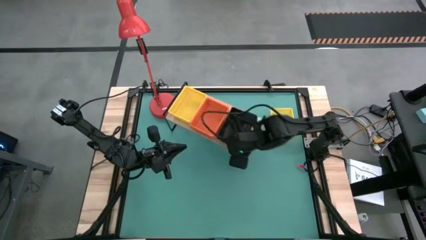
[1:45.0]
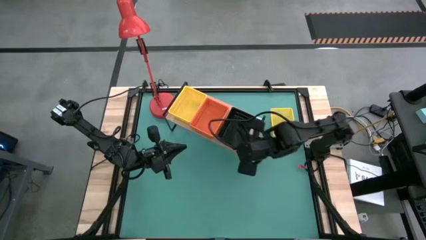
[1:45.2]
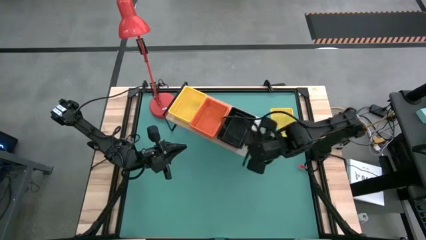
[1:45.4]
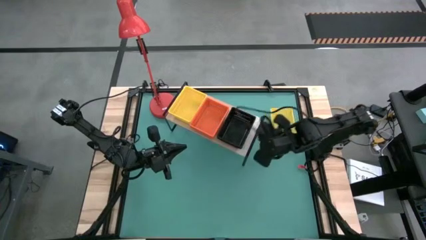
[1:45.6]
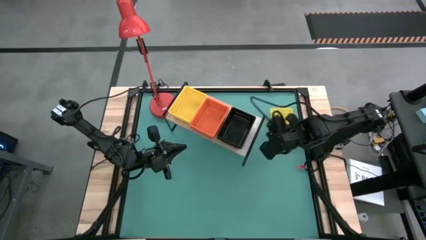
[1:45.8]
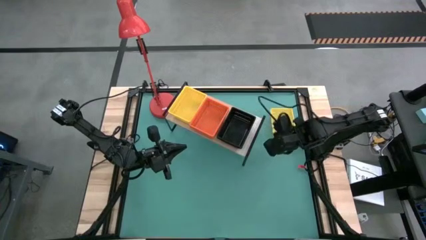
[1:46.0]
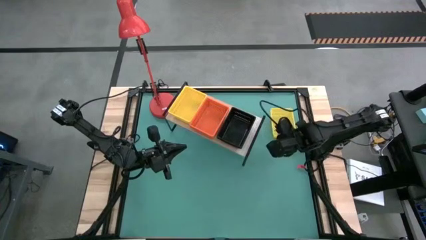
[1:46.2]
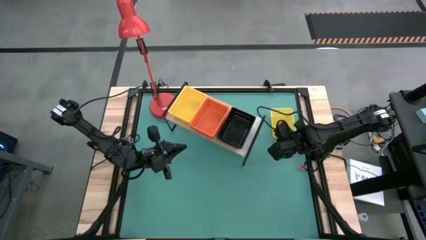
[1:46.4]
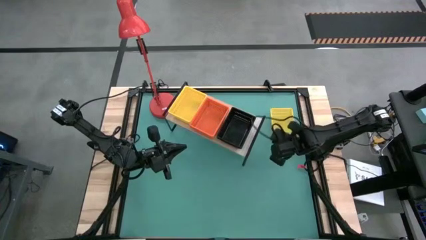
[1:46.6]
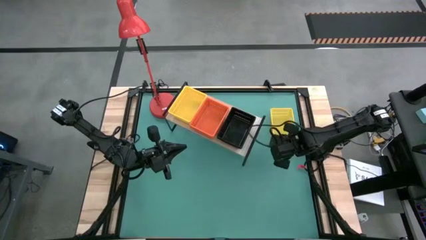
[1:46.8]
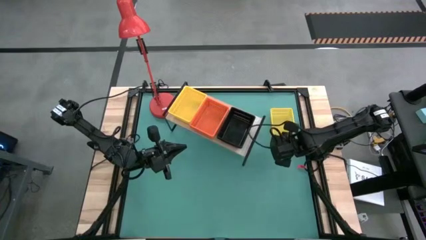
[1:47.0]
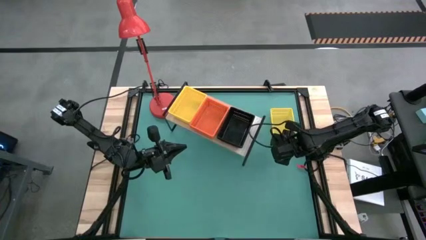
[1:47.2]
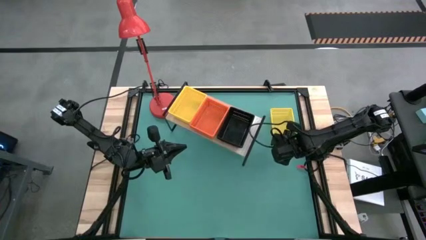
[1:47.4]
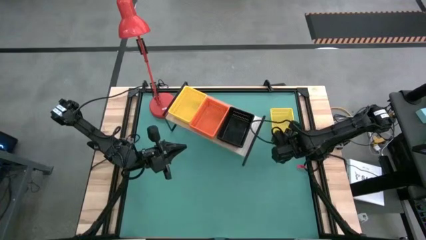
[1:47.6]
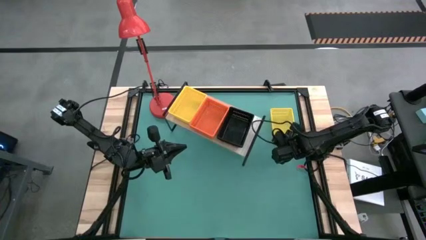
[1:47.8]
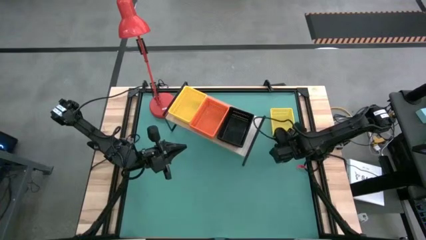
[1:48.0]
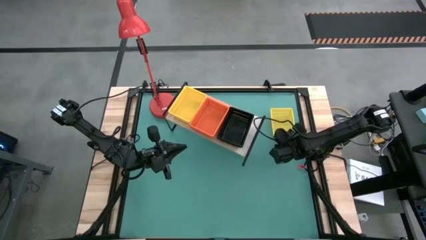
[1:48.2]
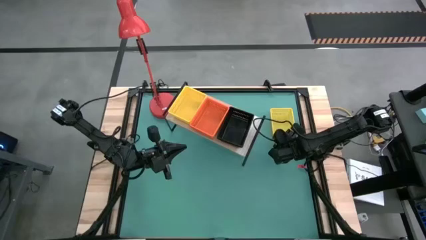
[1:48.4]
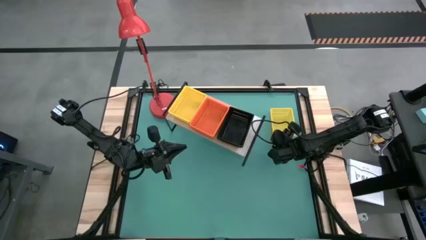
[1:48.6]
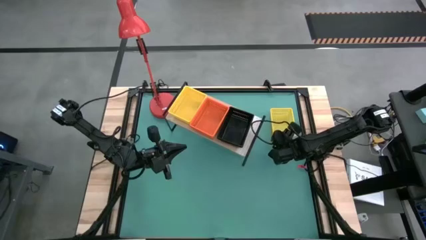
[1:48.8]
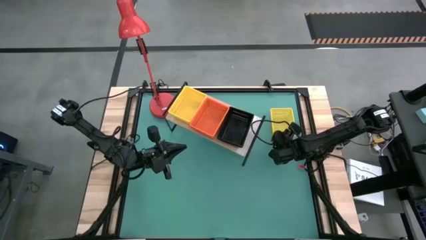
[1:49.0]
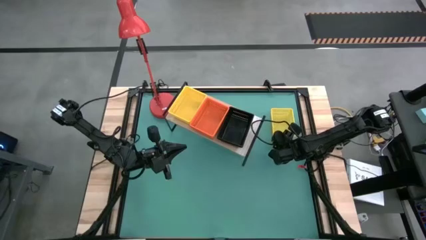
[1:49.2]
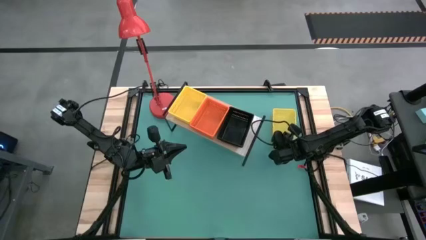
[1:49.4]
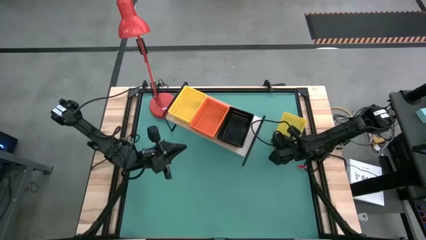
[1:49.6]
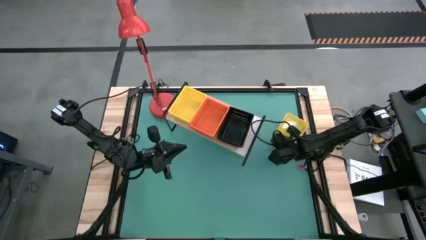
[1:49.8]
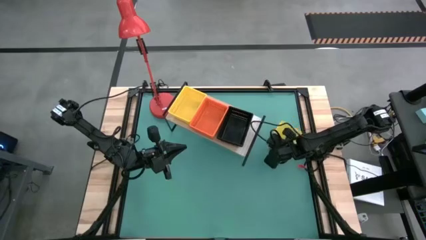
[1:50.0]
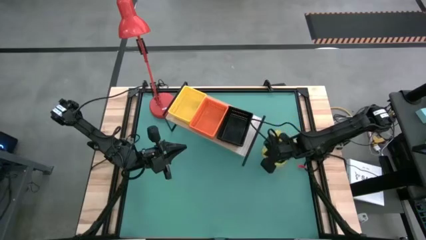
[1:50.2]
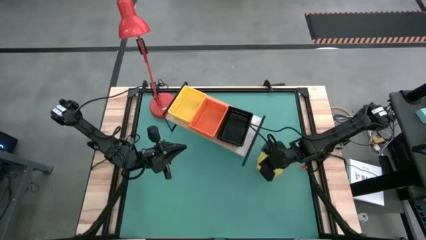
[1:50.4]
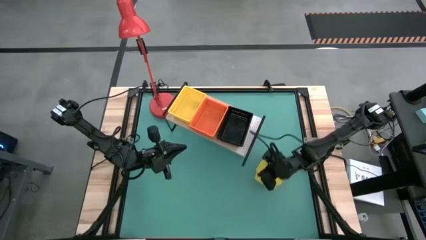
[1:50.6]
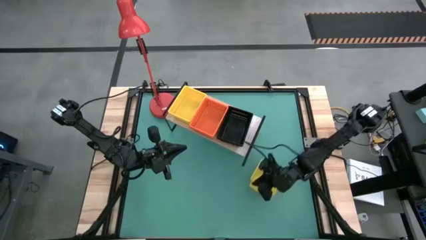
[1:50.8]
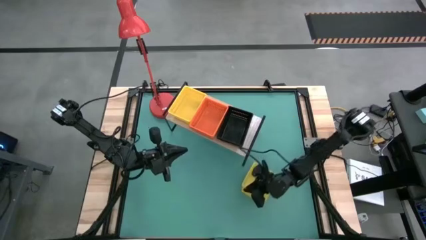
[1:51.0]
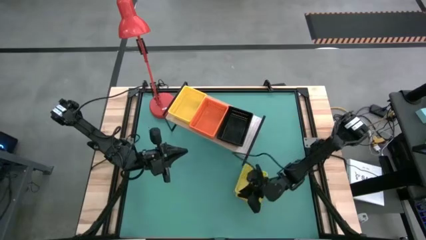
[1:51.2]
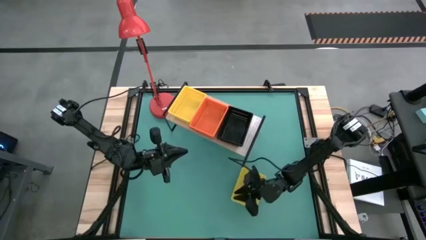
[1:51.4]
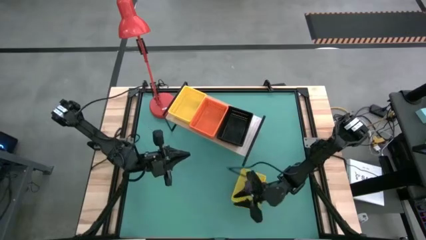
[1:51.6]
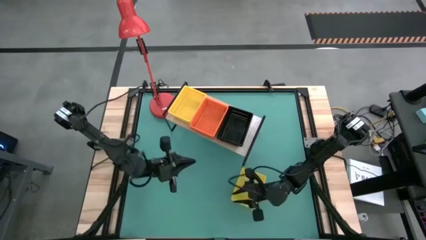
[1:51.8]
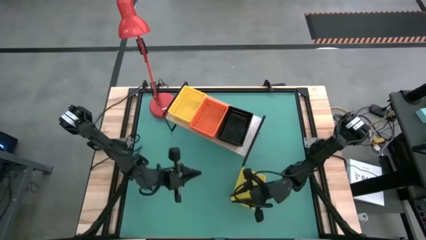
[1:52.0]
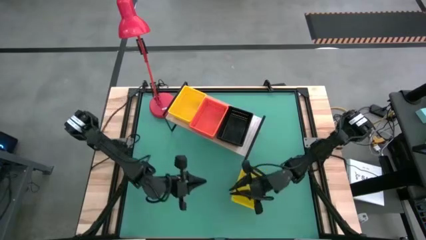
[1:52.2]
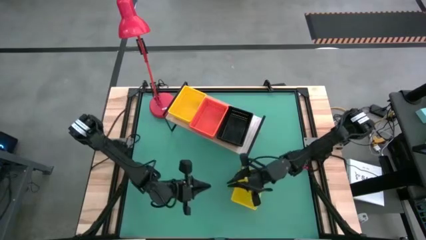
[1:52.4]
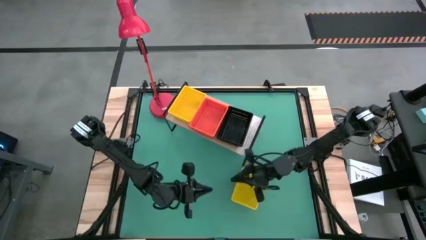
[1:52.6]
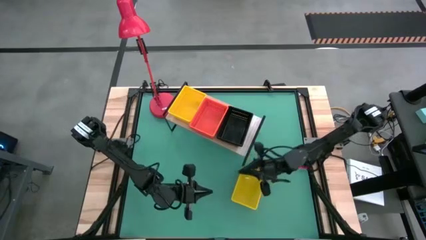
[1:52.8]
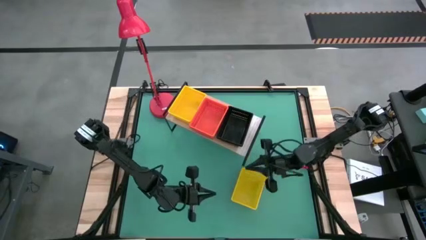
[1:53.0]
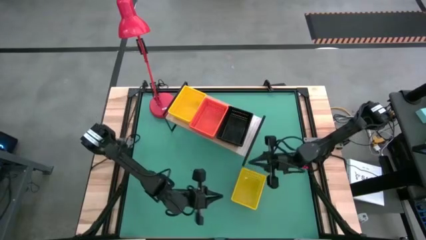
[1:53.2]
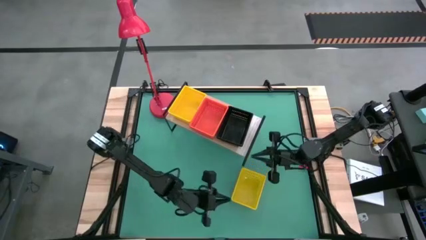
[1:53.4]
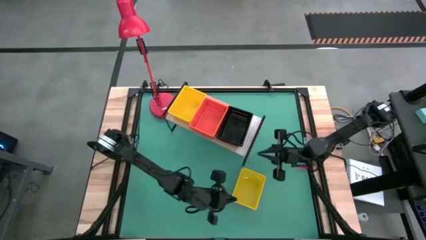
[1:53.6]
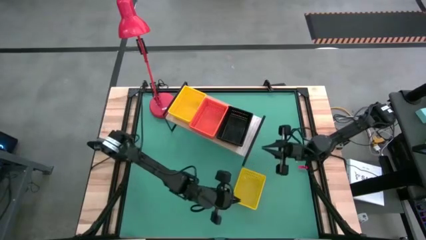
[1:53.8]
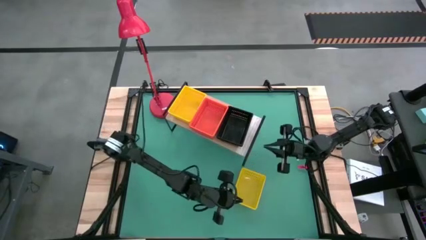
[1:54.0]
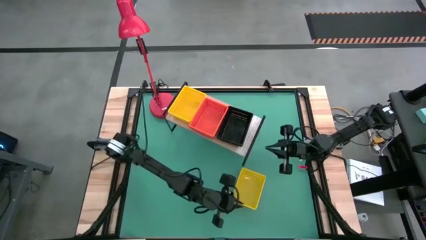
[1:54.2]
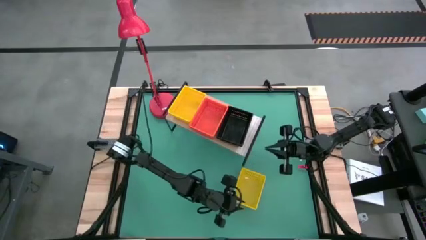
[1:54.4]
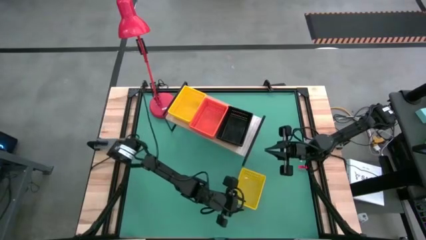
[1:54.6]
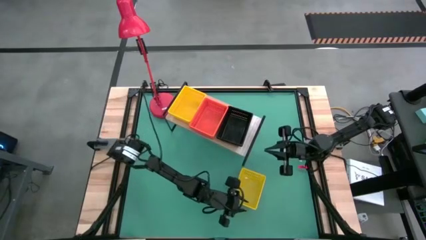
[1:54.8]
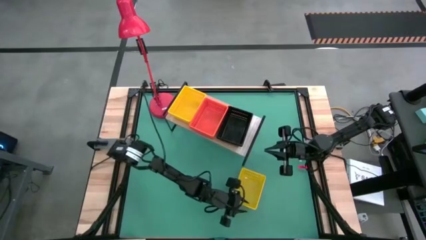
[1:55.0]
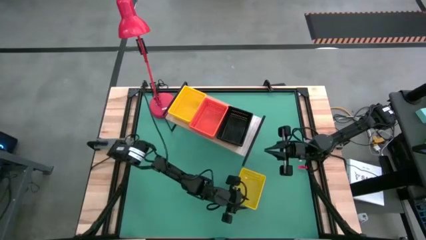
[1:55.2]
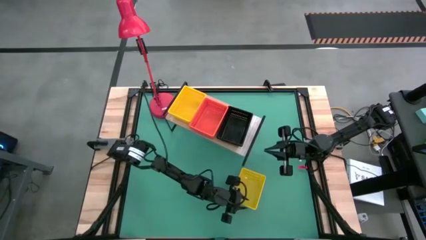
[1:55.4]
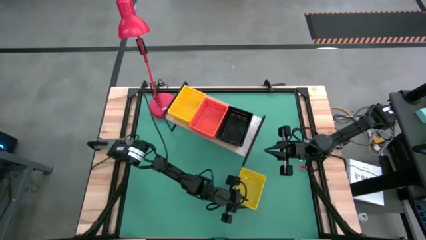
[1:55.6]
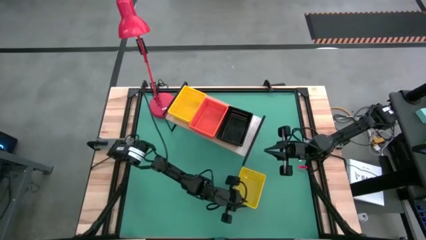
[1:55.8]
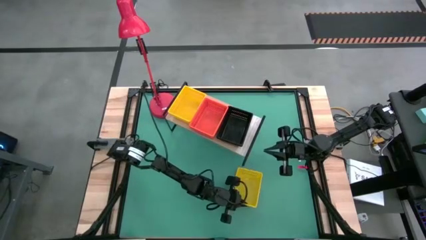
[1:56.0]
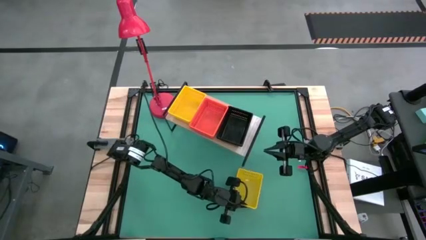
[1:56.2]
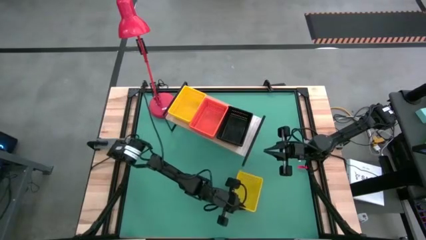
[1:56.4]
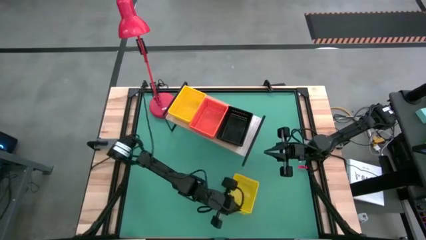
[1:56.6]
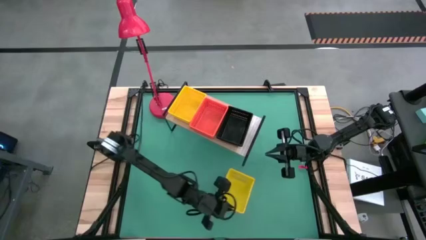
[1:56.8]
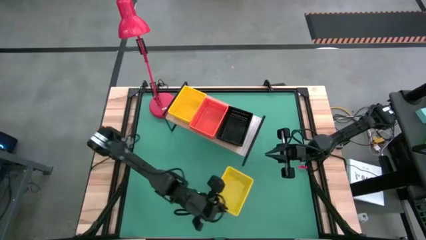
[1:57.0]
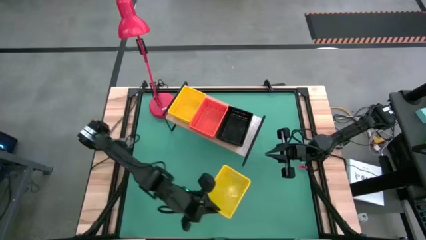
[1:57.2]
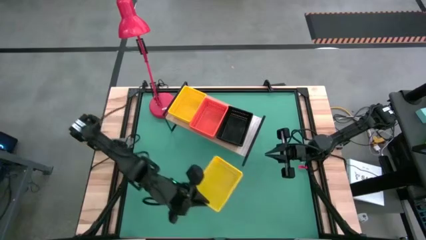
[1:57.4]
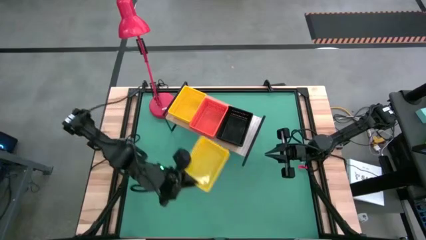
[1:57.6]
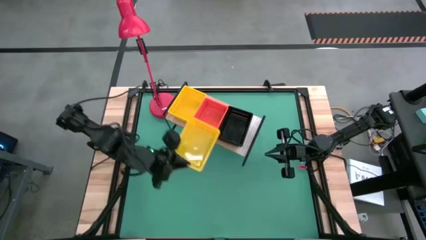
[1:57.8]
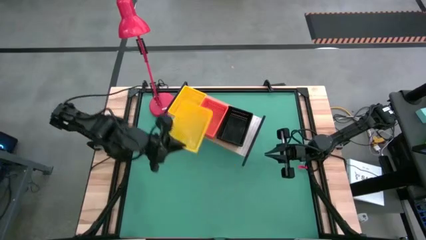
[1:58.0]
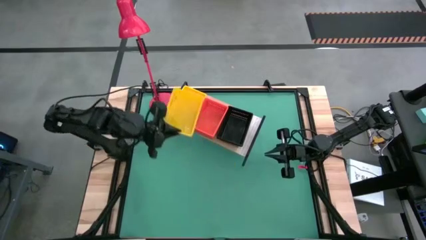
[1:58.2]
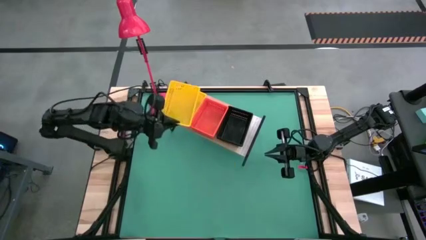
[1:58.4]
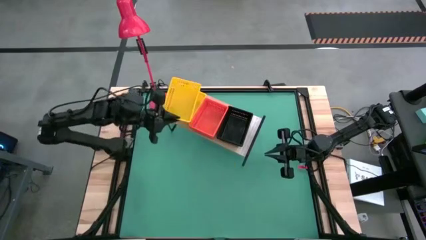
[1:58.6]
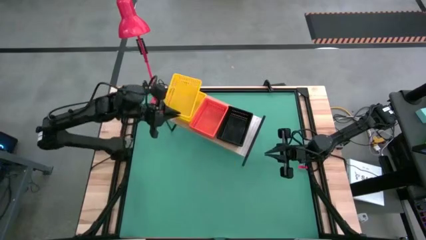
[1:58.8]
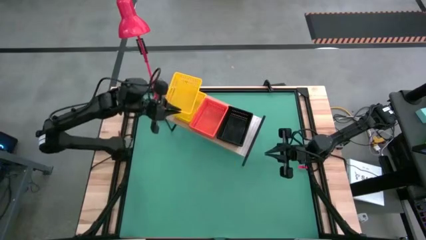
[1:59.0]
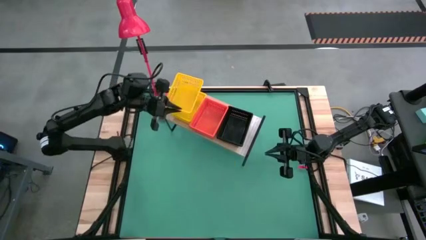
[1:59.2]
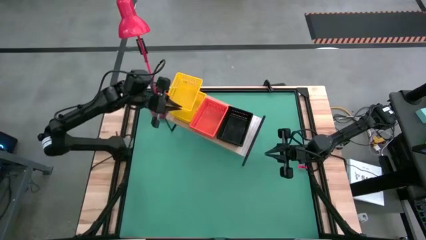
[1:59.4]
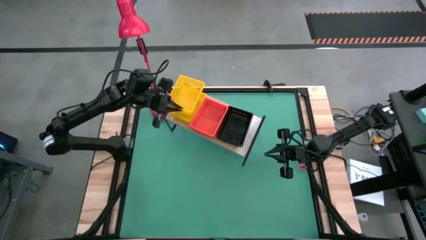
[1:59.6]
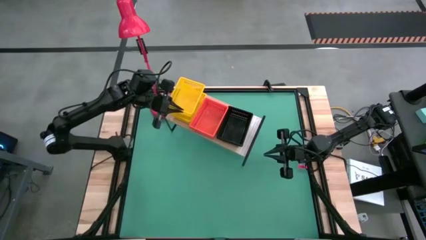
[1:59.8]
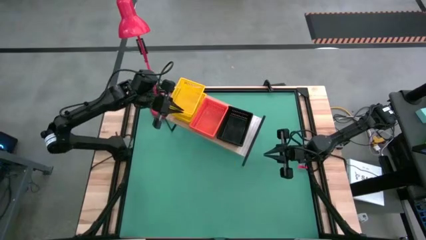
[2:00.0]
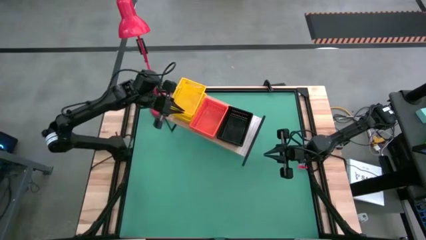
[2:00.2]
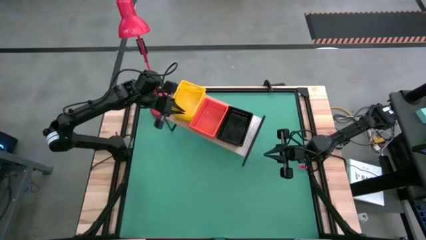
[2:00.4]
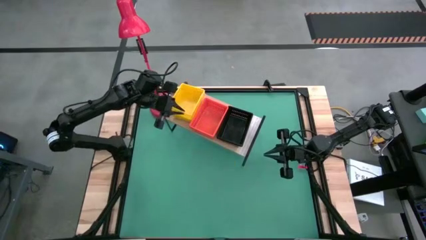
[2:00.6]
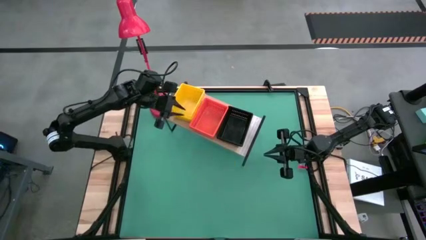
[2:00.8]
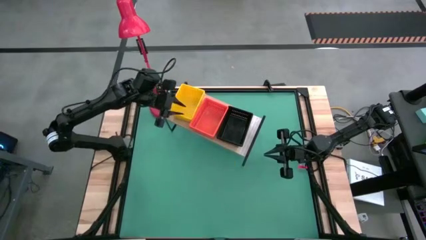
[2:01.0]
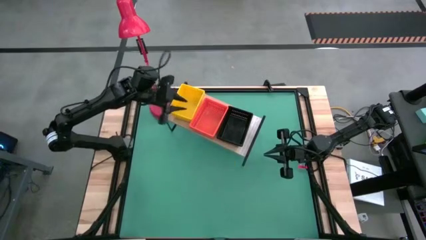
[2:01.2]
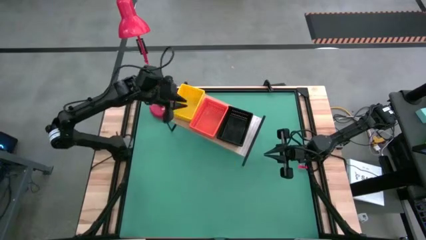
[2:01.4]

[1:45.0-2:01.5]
Task: Stack baskets on shelf by color
Stack the yellow bin on top of the other yellow bins on the shelf
